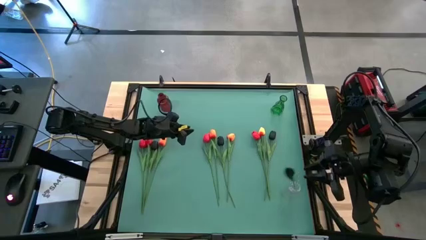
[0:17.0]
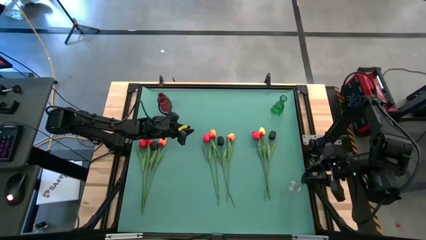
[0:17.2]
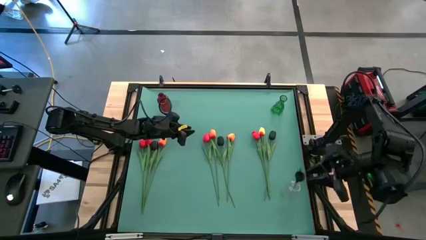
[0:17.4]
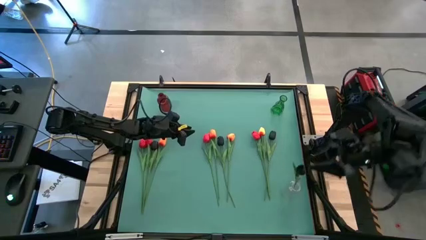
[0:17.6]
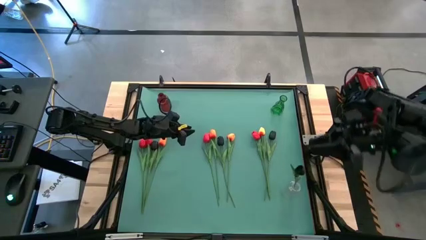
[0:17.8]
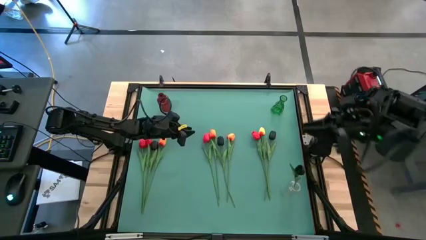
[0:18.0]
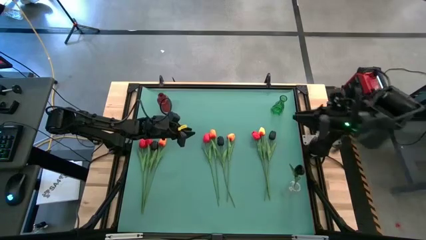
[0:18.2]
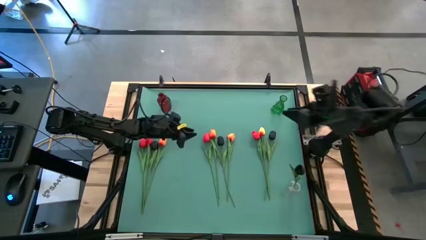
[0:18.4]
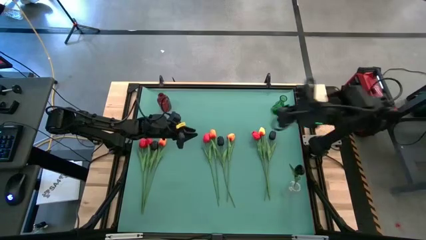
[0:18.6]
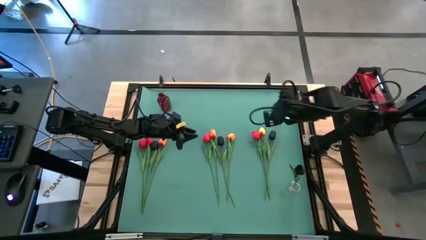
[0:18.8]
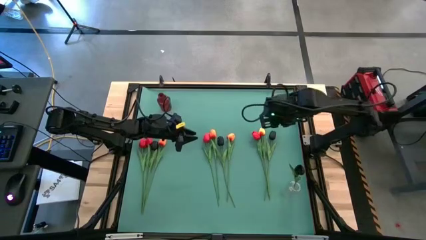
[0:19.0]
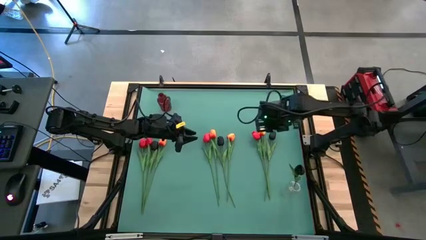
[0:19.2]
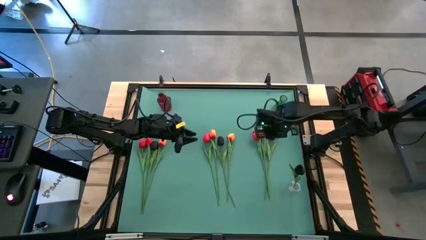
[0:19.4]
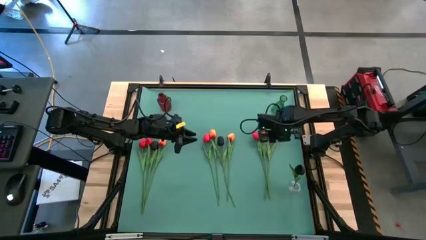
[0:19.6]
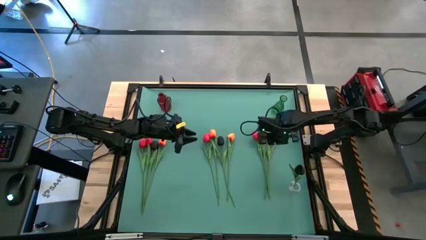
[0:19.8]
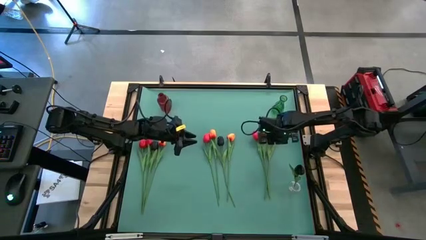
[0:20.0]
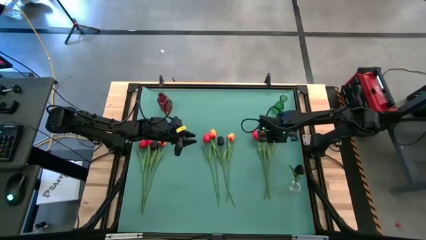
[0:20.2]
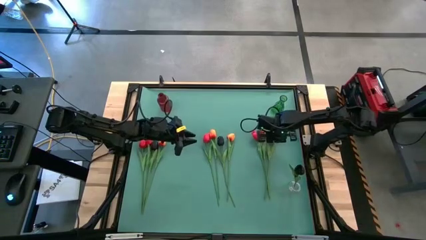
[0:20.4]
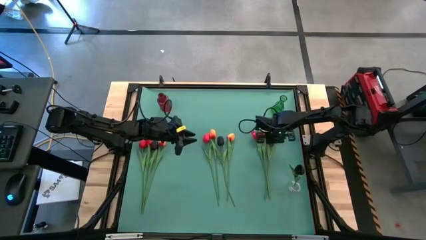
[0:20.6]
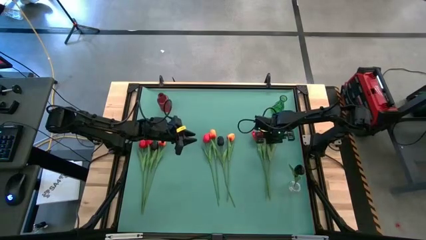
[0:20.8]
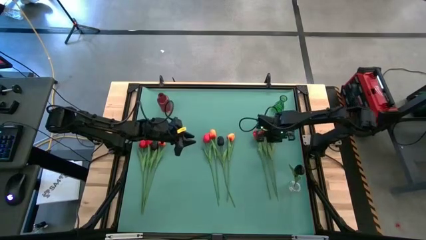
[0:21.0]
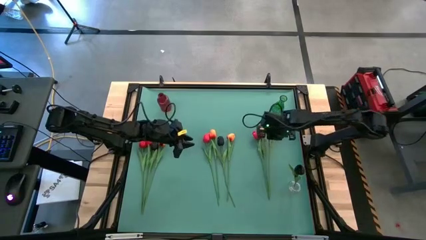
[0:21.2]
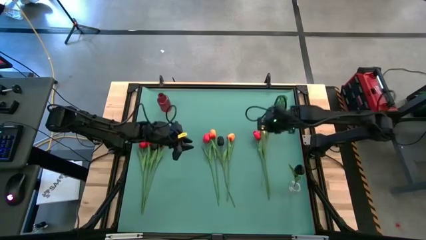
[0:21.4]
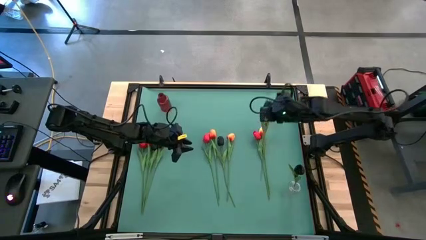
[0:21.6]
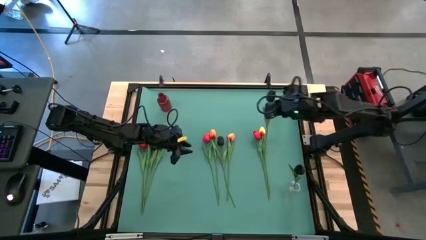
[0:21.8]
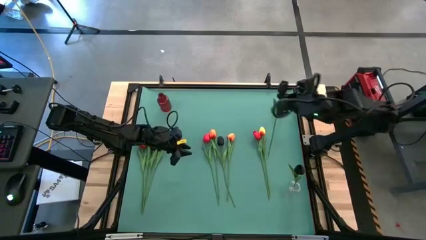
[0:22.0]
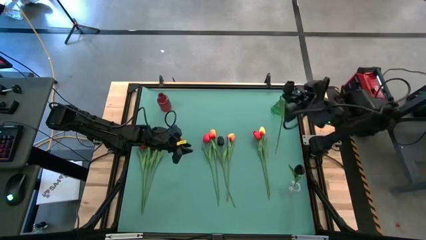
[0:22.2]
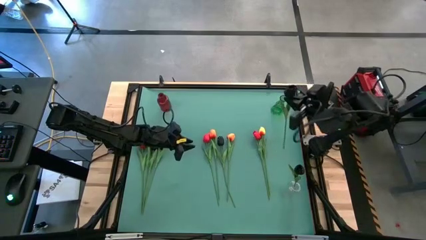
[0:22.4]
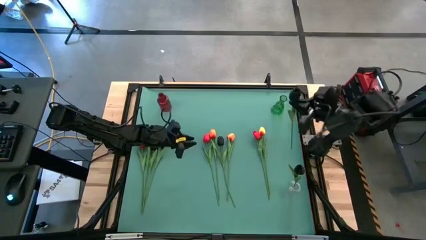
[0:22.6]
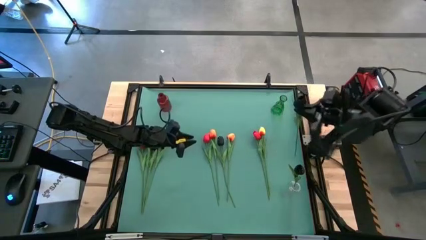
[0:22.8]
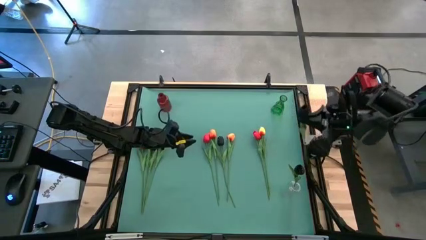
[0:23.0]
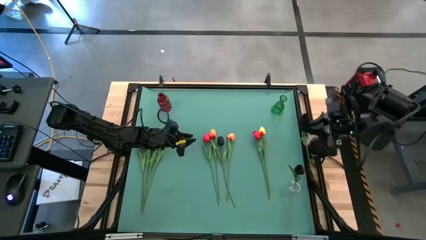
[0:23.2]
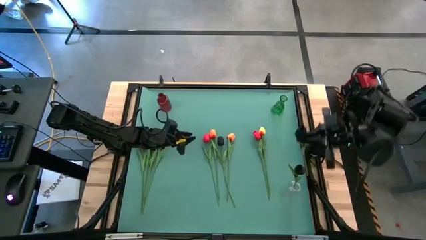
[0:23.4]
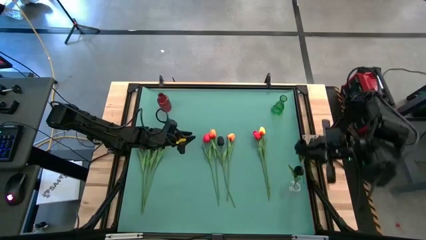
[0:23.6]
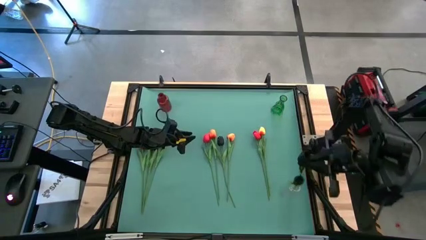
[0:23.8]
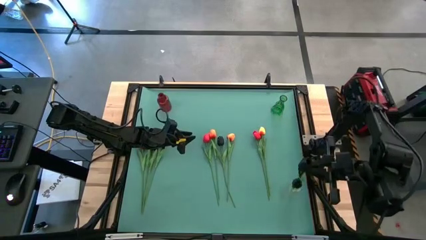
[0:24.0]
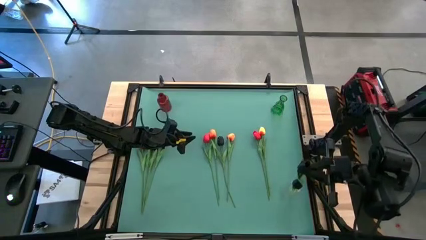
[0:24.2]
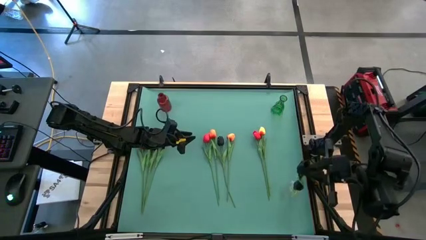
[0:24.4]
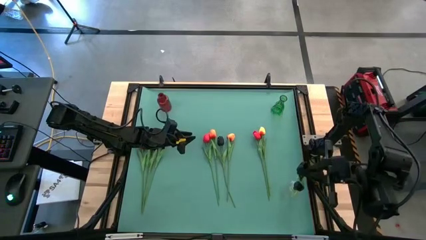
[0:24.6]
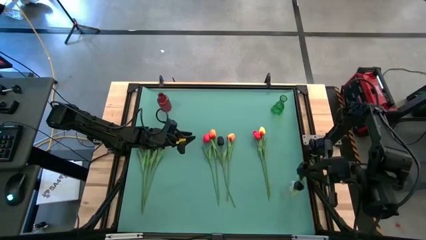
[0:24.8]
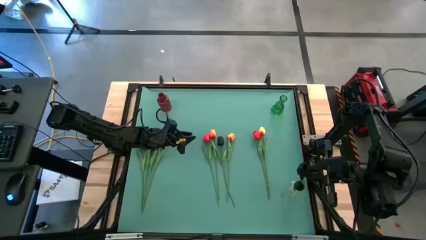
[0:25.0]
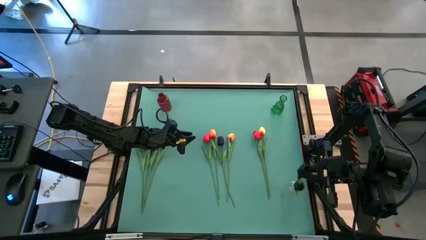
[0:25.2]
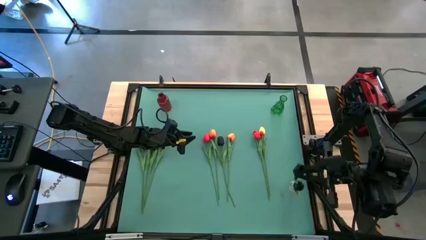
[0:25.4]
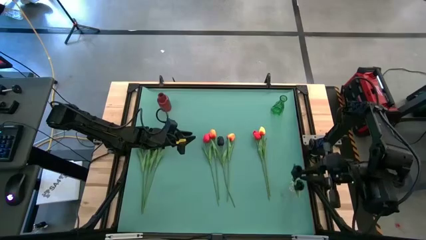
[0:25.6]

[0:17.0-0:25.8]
Task: Sort flowers into vase by color
Put the right black tulip into the transparent flower vase
